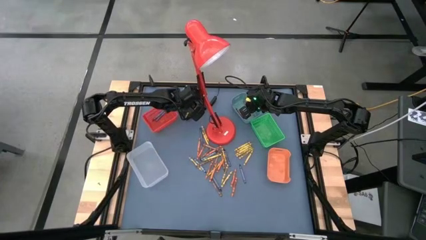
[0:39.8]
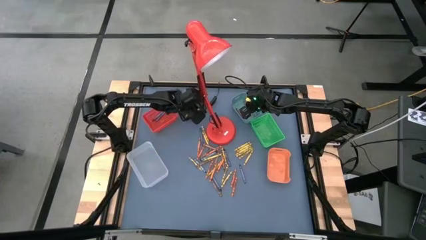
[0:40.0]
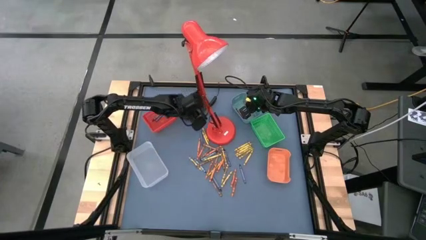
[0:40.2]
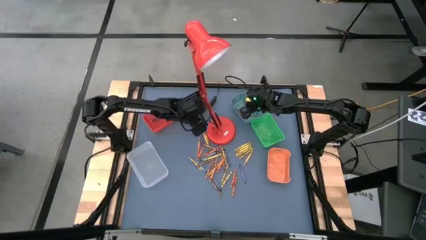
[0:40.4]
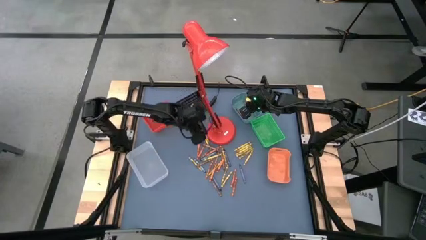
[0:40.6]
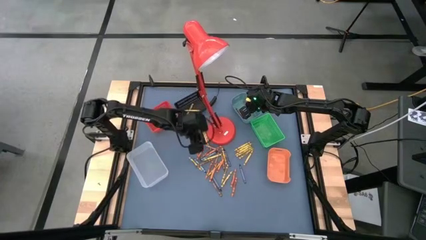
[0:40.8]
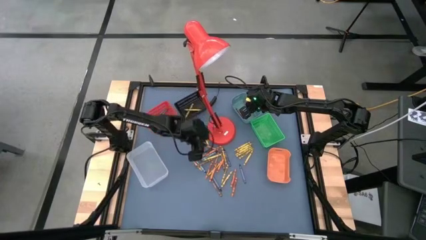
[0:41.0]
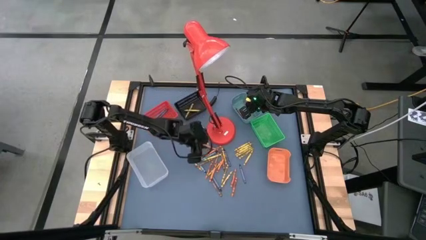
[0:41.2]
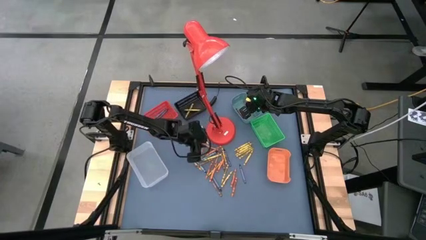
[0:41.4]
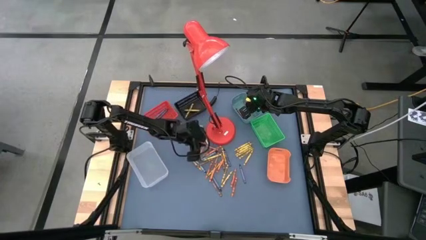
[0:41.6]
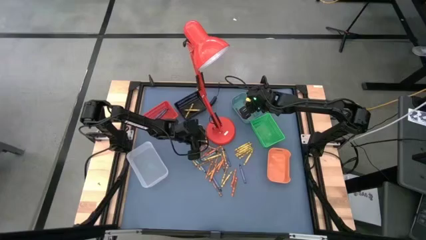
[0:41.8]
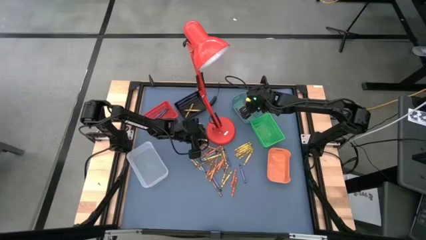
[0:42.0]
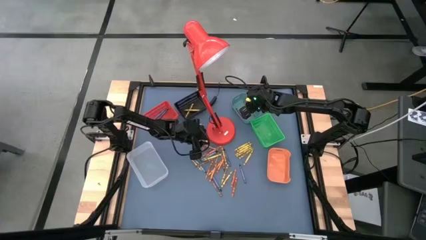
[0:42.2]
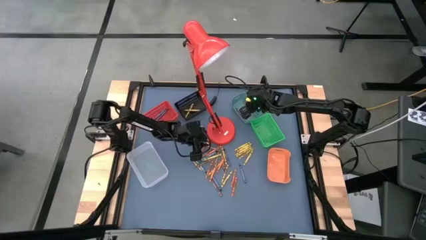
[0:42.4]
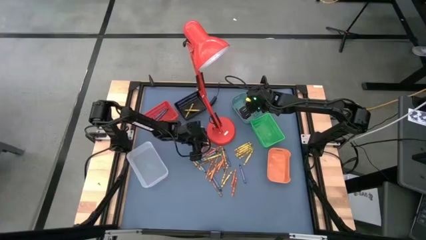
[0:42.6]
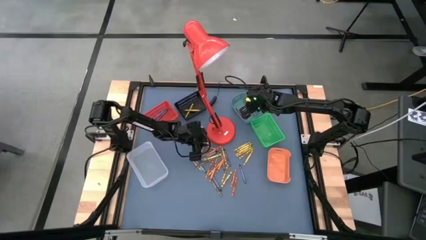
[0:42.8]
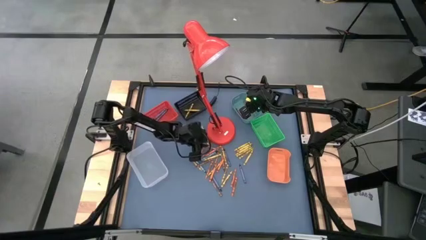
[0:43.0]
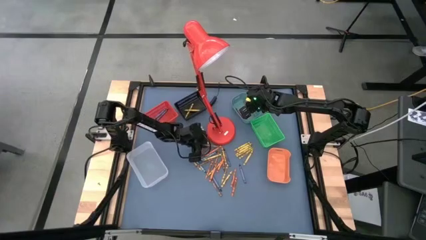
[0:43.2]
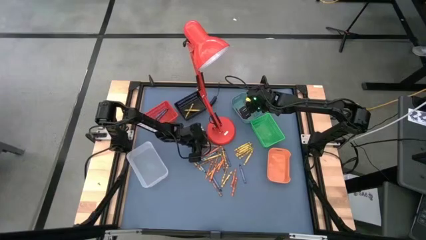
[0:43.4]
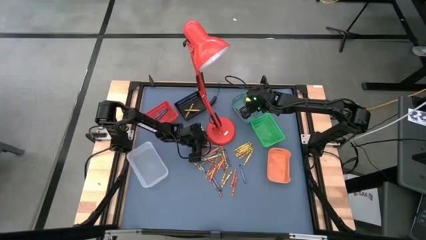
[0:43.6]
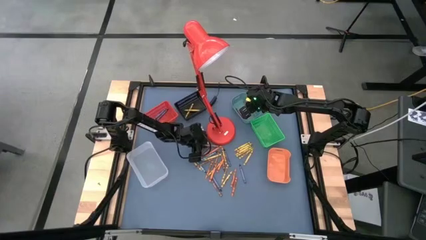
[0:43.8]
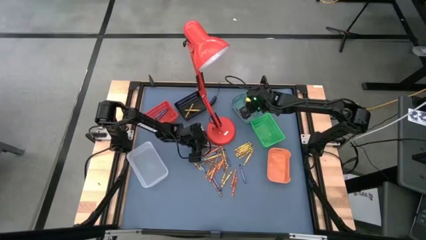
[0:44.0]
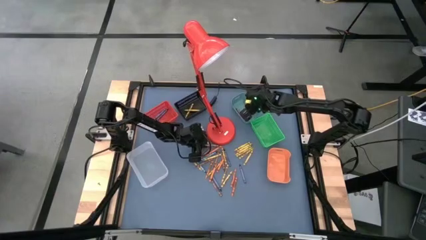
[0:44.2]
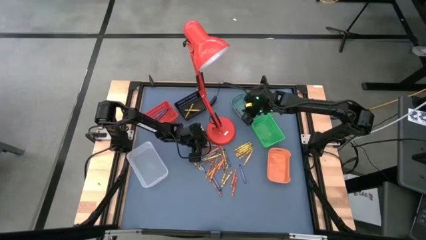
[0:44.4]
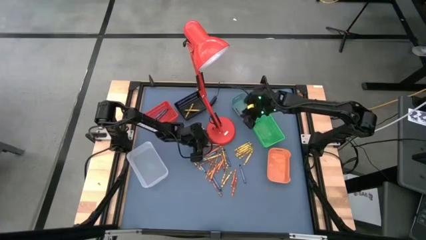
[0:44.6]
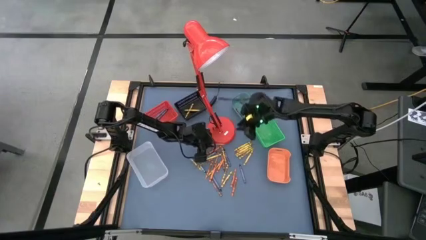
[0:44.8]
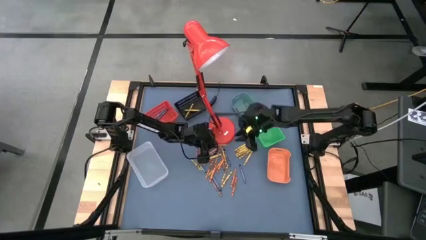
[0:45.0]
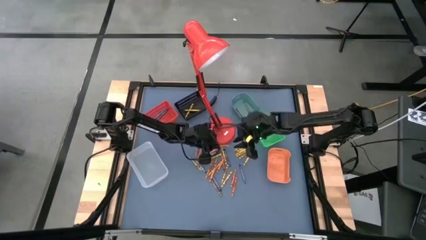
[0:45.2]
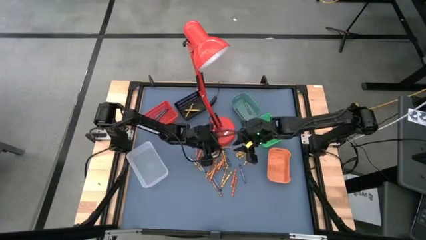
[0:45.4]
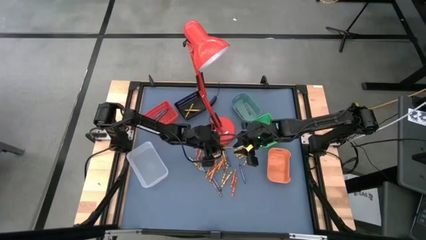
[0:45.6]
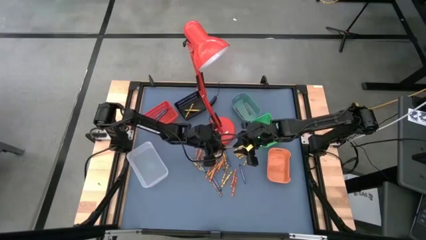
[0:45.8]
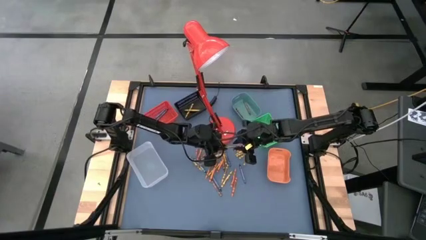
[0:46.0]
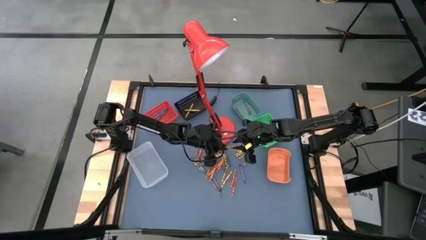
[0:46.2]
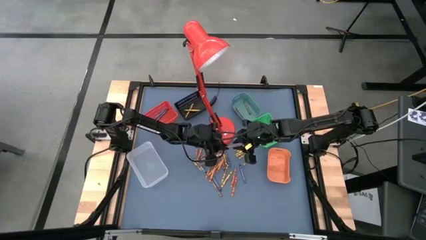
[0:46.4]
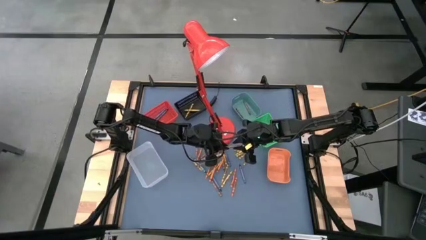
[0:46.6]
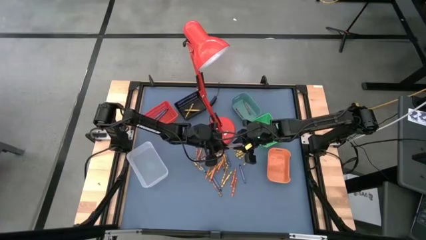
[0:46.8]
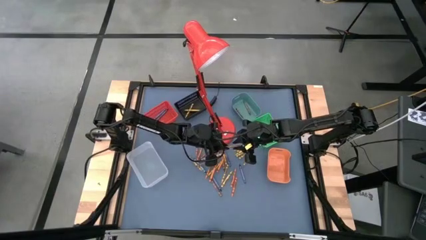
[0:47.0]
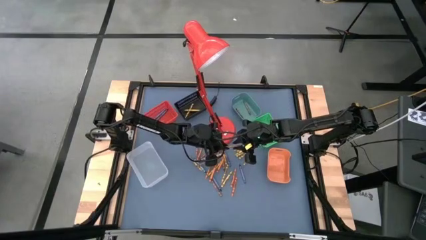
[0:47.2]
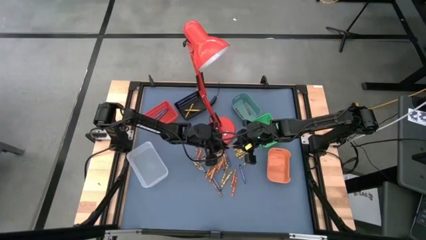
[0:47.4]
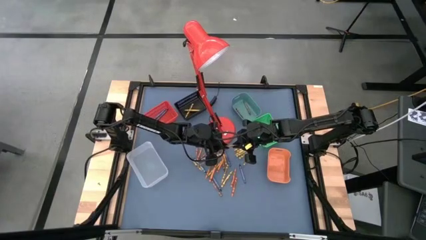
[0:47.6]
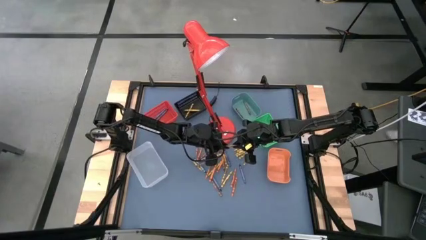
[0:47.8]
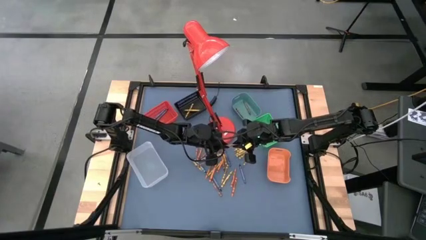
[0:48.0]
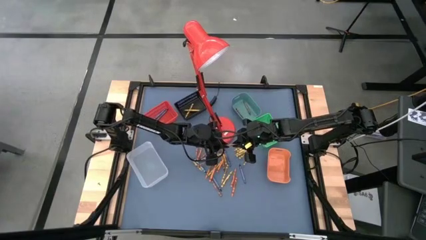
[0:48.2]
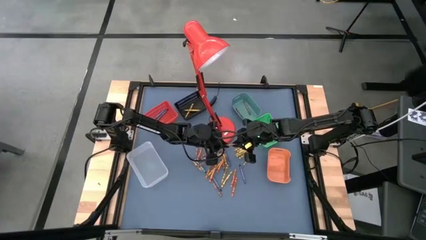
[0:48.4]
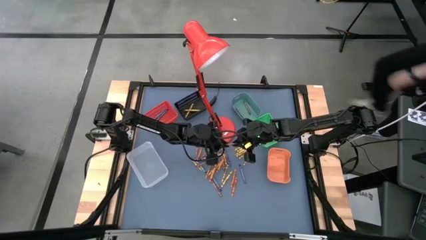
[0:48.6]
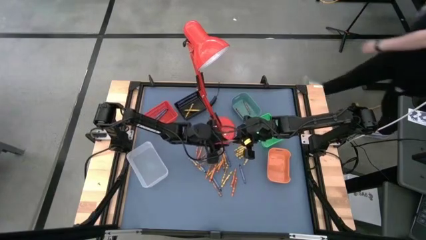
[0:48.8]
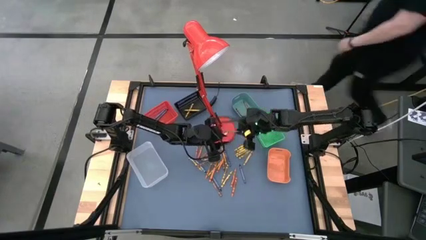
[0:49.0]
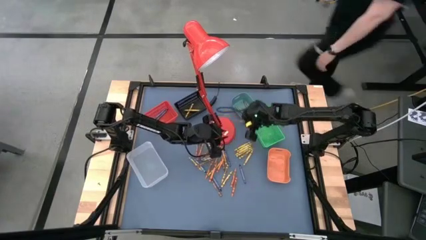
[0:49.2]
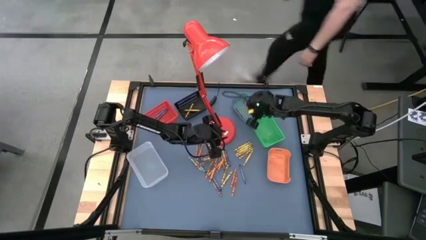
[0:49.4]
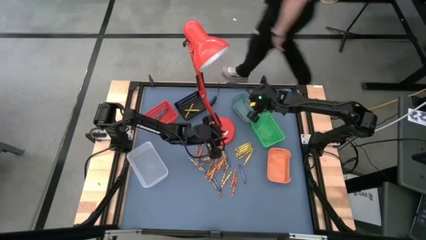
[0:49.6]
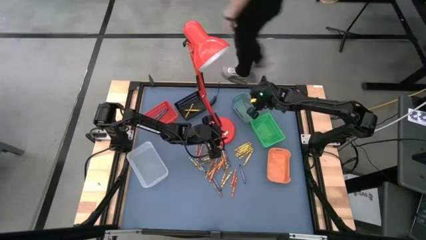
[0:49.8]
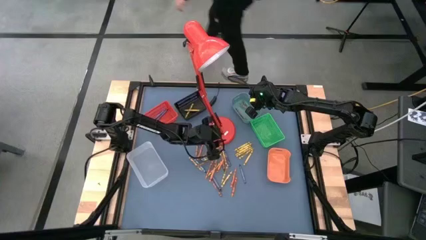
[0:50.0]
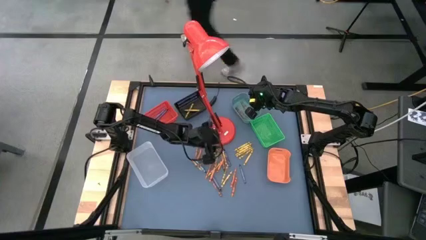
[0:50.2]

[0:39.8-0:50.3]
Task: Sort crayons
Put the brown crayon into the top right blue bin

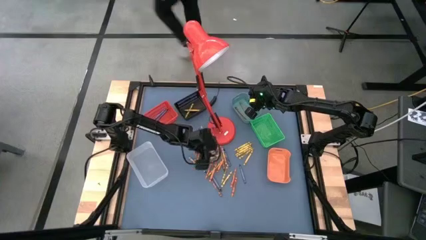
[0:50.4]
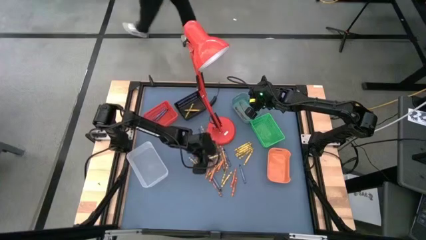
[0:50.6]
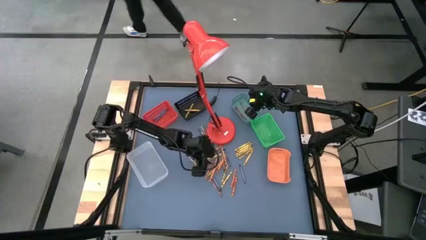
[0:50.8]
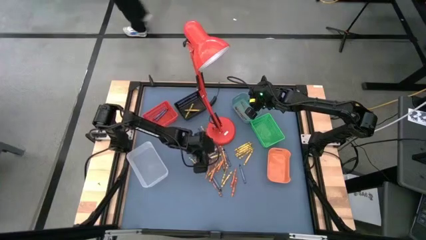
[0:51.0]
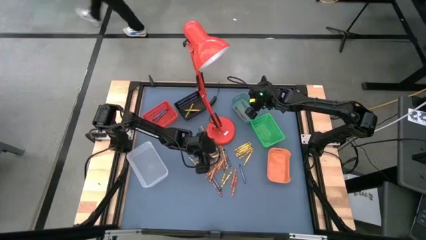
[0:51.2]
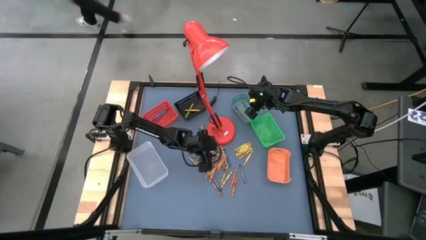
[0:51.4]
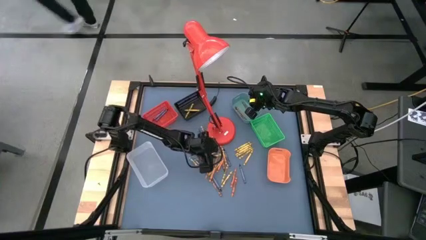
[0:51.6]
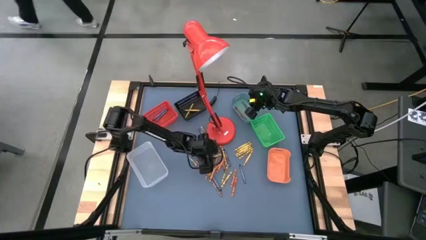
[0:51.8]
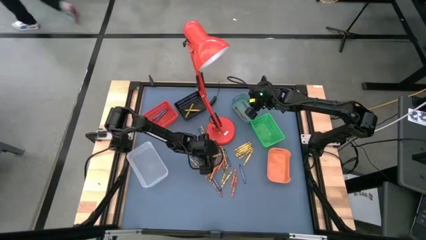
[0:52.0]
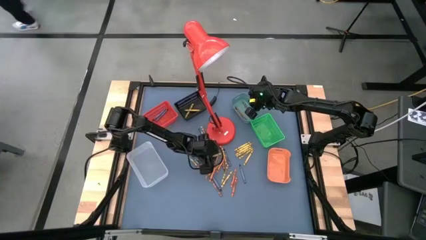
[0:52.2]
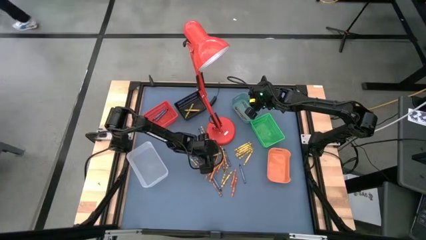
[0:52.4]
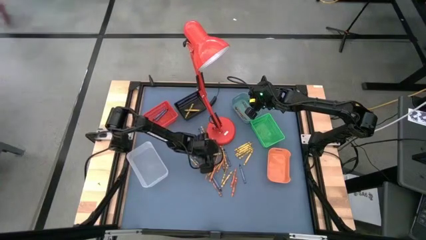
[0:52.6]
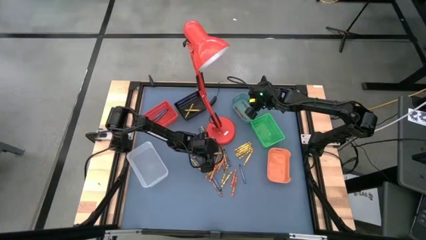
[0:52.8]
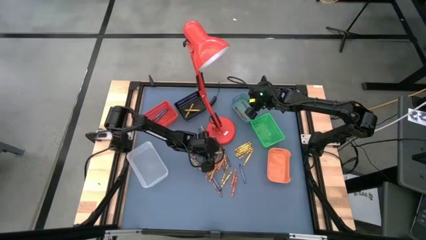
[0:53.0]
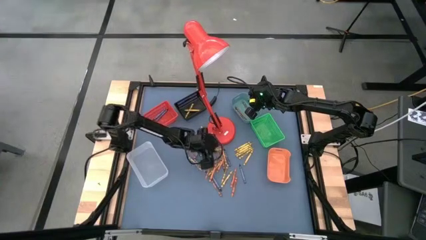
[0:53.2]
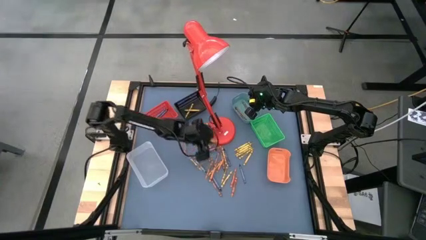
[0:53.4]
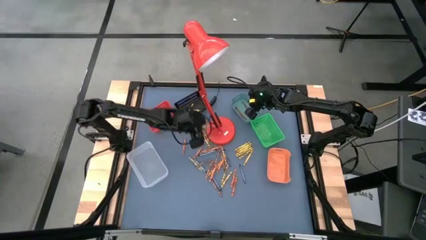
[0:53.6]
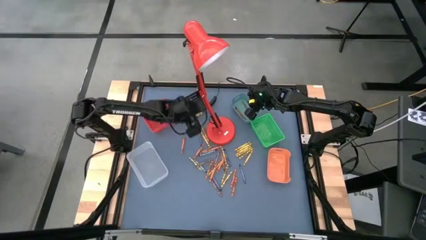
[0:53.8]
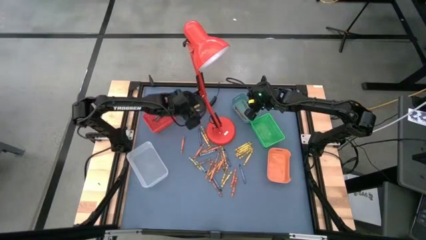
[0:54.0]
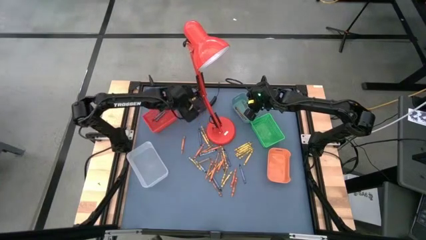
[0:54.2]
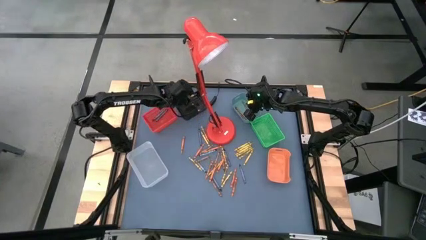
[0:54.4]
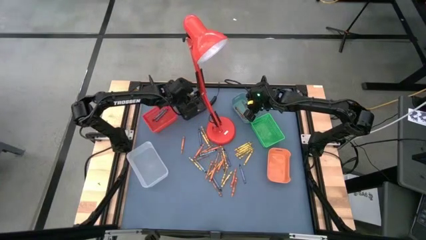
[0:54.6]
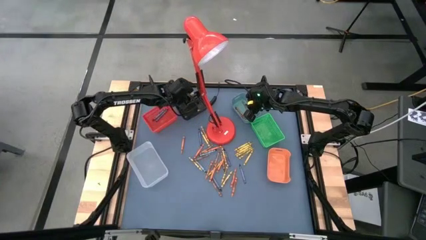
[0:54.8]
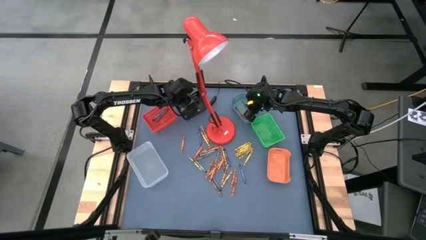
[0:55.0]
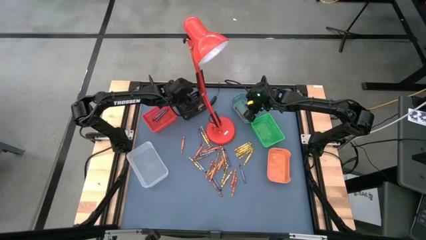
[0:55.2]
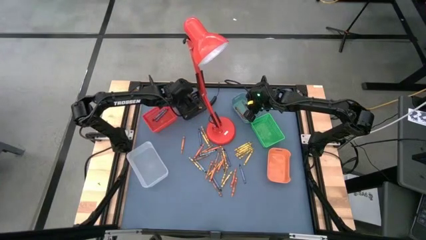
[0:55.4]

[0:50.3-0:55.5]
Put the yellow crayon into the top left black bin

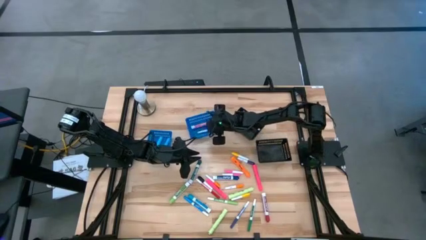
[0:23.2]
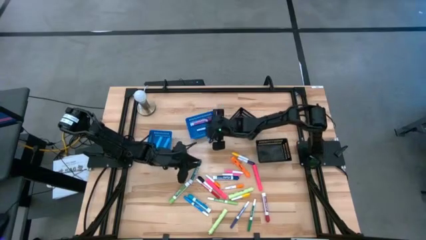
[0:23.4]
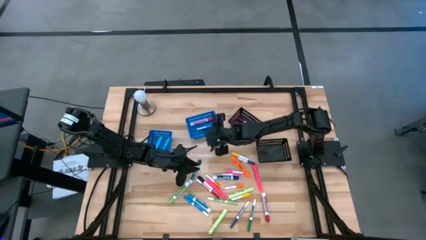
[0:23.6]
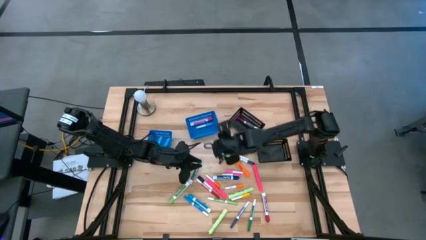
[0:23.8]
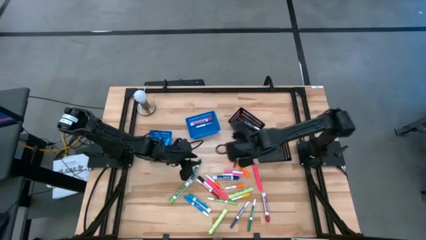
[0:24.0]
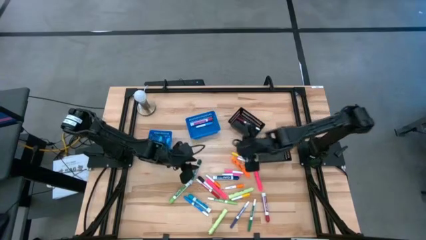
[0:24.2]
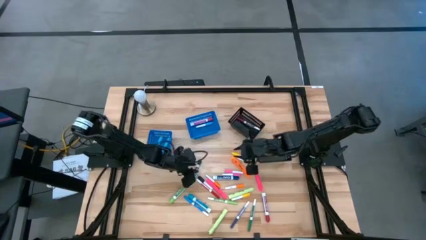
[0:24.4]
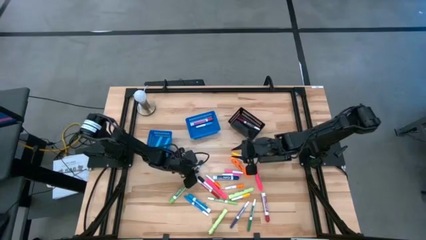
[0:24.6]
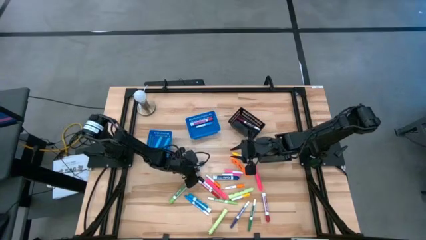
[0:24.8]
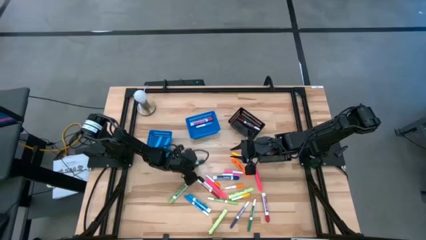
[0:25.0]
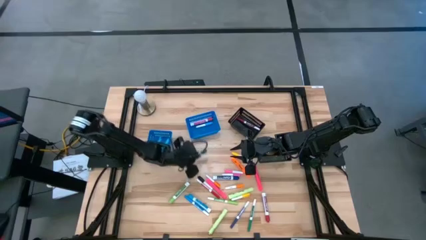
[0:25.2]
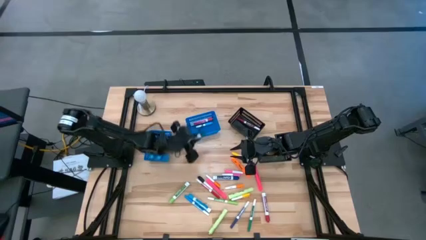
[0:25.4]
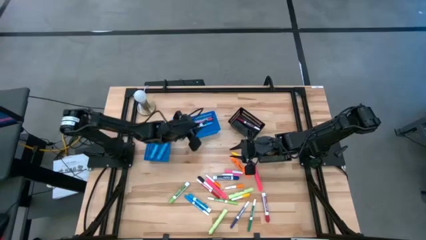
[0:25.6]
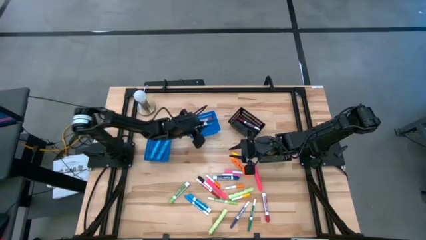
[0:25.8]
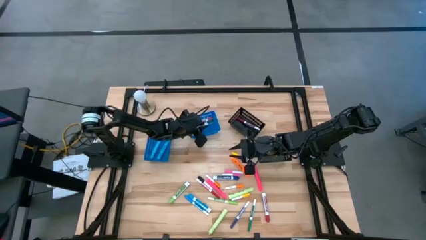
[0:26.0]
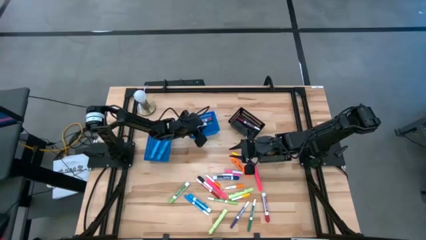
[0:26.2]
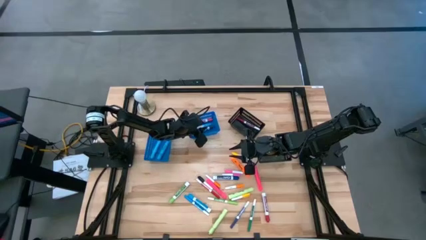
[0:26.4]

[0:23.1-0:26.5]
Task: Pick & Place Markers
Put the green marker pen into the right blue bin
